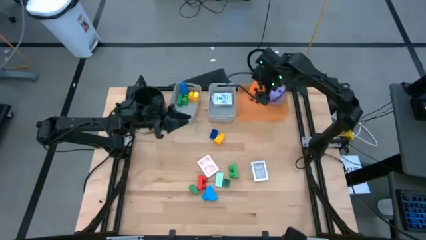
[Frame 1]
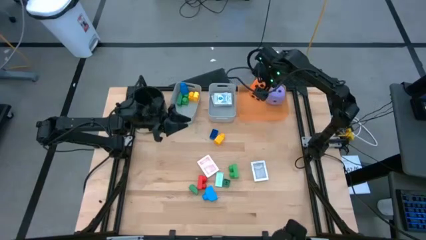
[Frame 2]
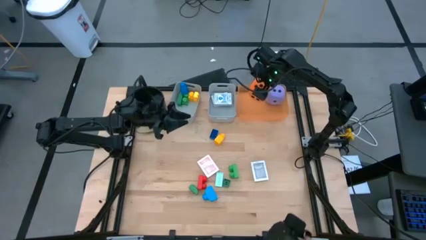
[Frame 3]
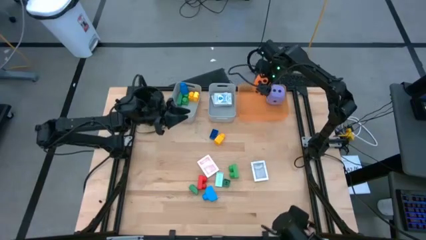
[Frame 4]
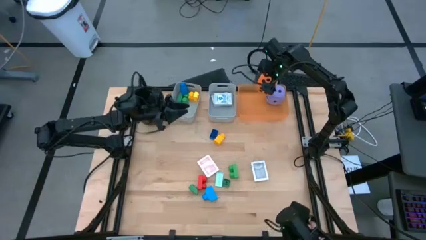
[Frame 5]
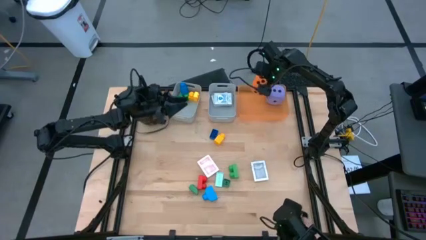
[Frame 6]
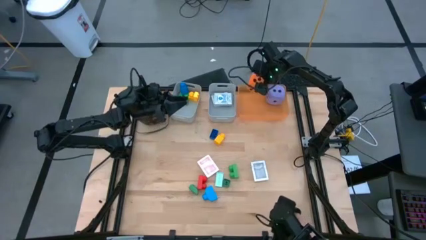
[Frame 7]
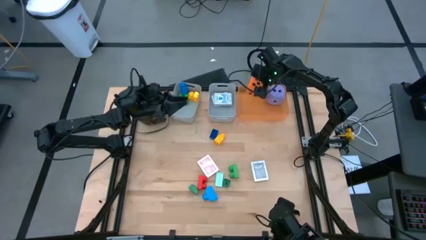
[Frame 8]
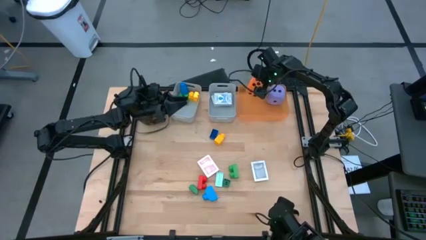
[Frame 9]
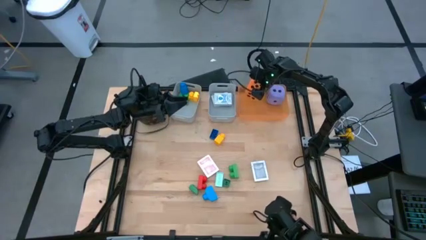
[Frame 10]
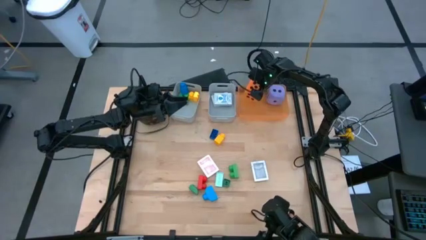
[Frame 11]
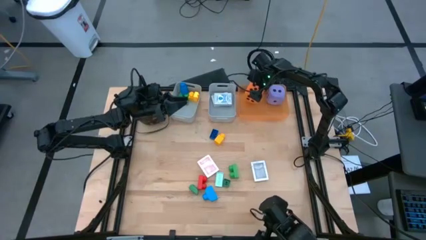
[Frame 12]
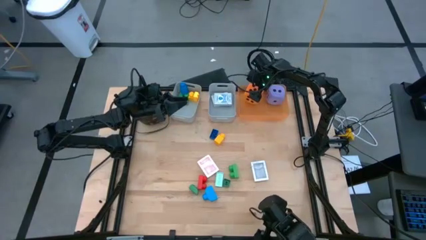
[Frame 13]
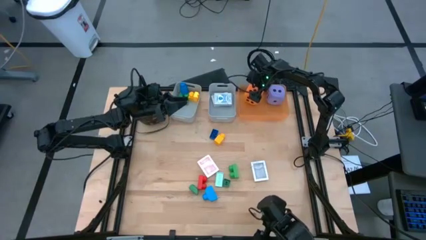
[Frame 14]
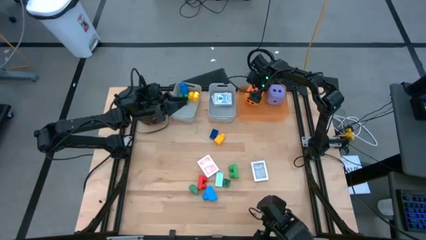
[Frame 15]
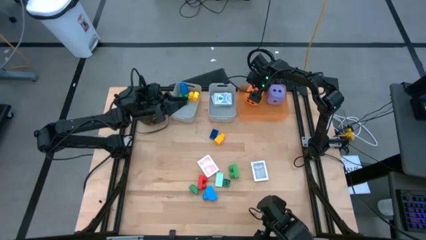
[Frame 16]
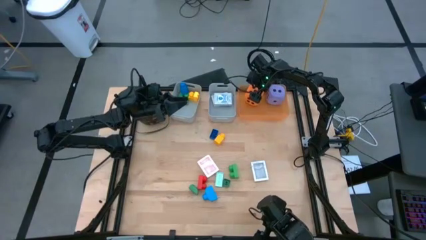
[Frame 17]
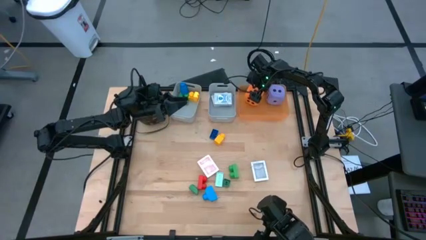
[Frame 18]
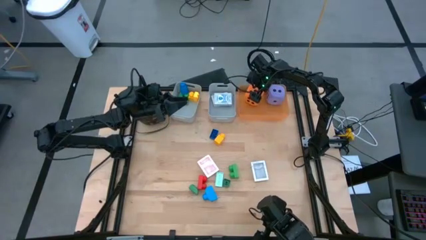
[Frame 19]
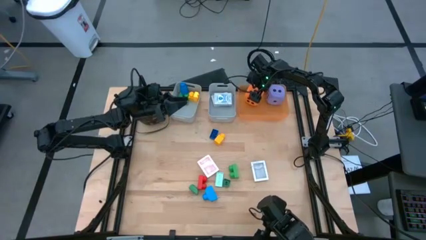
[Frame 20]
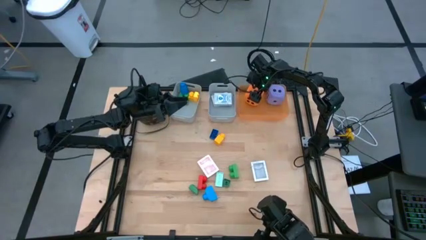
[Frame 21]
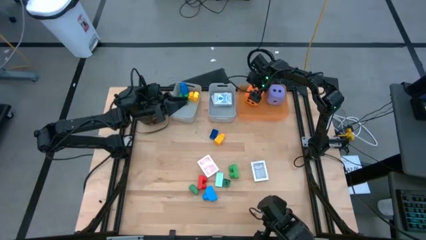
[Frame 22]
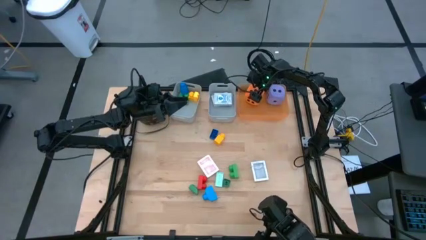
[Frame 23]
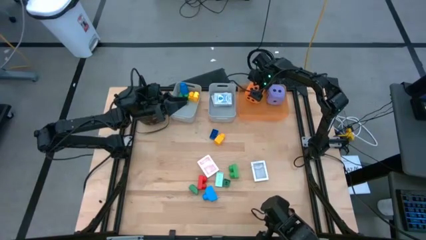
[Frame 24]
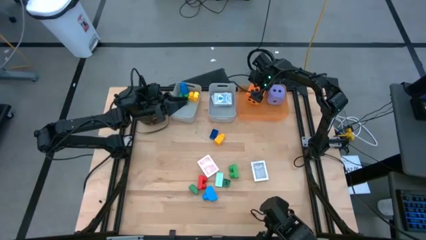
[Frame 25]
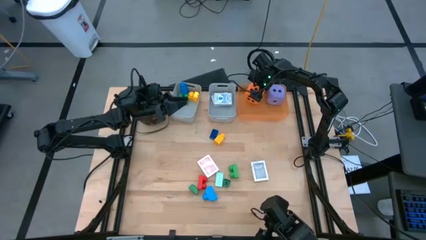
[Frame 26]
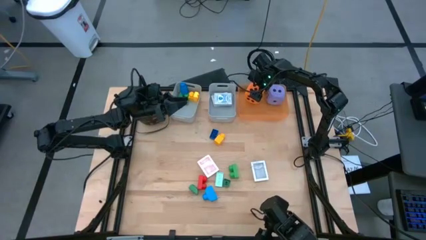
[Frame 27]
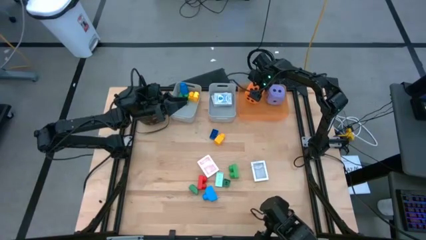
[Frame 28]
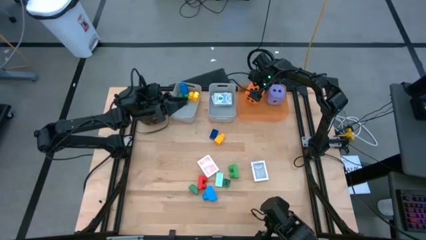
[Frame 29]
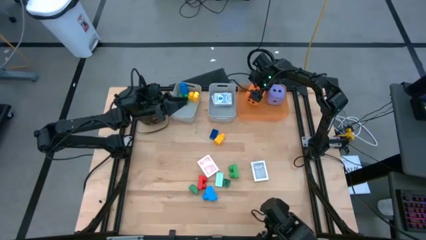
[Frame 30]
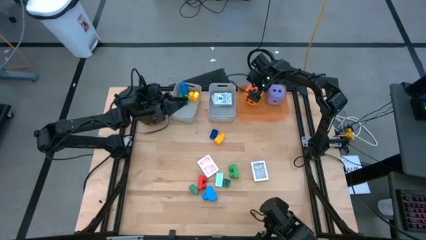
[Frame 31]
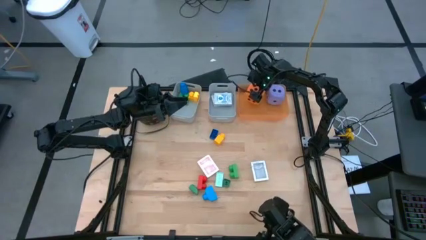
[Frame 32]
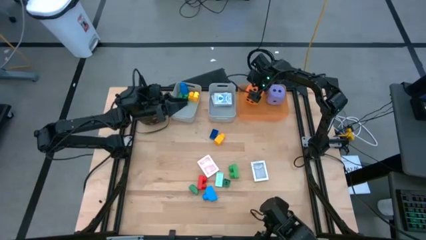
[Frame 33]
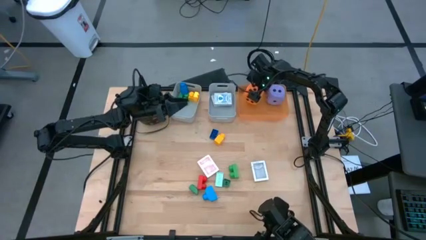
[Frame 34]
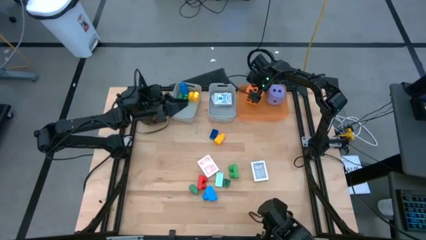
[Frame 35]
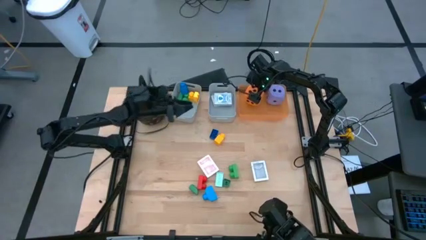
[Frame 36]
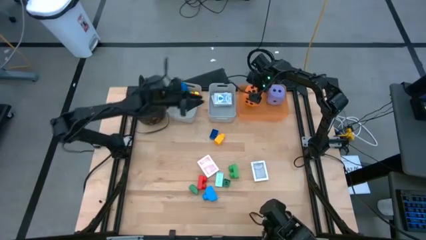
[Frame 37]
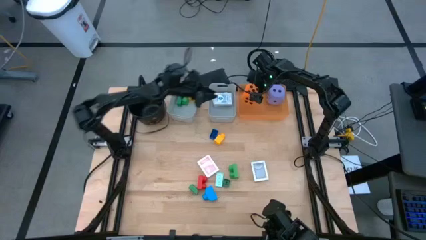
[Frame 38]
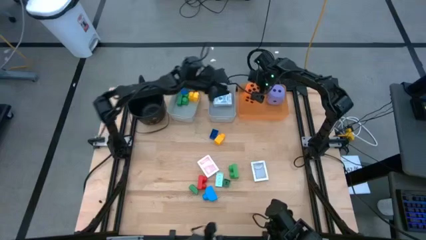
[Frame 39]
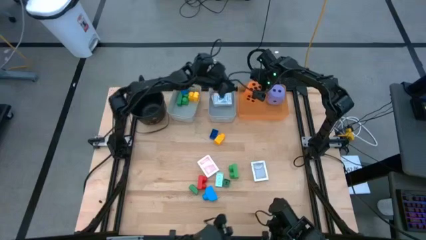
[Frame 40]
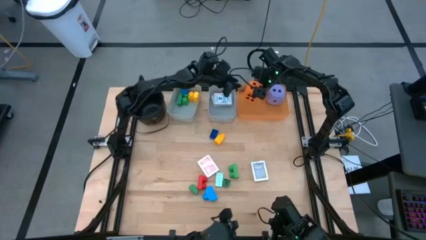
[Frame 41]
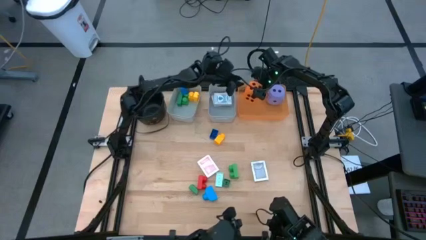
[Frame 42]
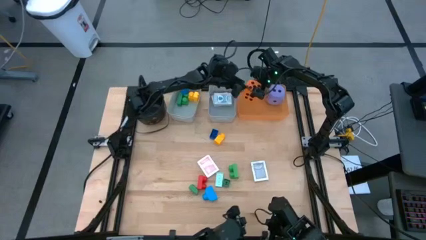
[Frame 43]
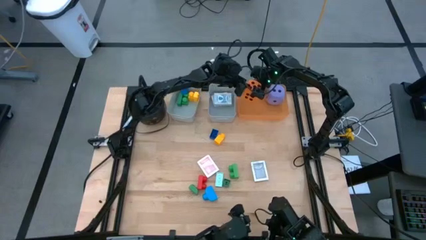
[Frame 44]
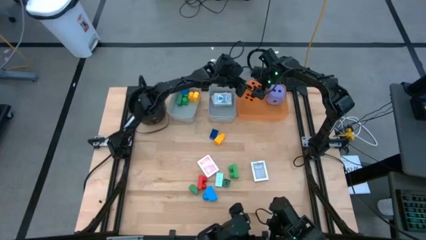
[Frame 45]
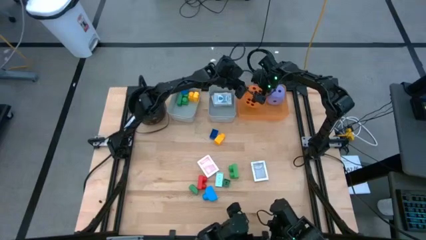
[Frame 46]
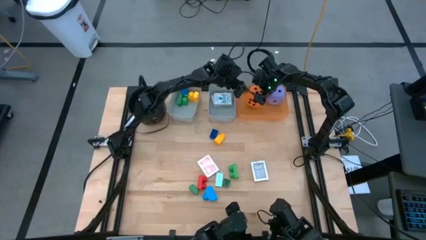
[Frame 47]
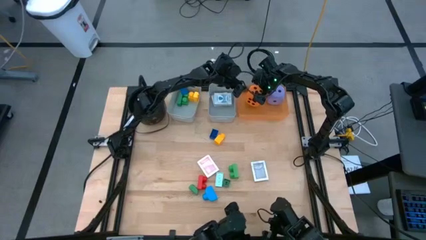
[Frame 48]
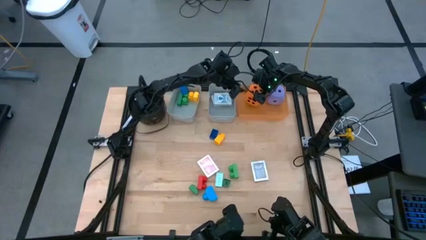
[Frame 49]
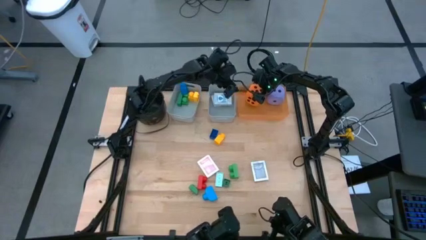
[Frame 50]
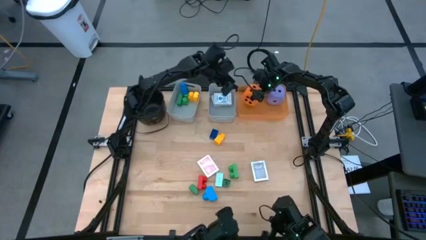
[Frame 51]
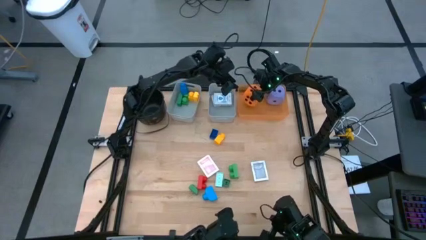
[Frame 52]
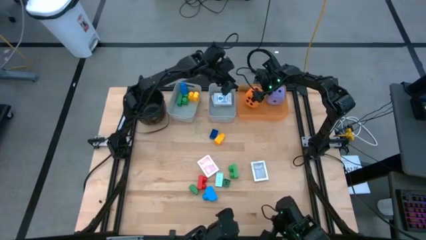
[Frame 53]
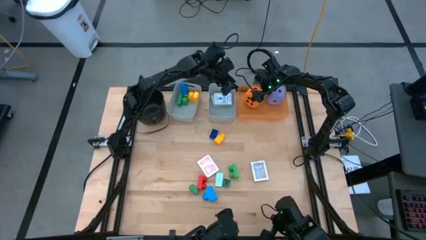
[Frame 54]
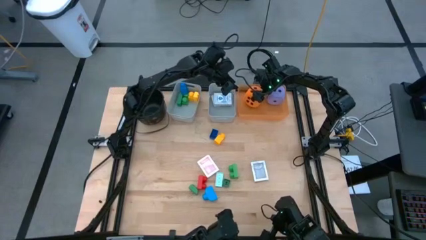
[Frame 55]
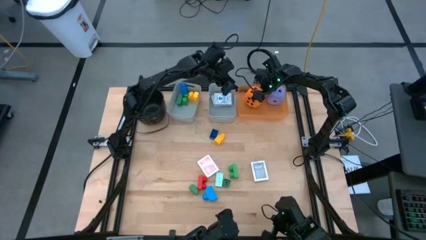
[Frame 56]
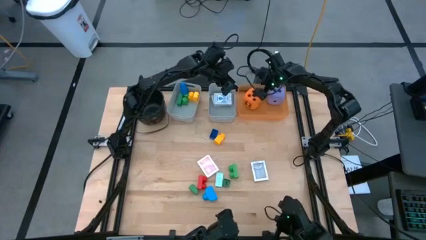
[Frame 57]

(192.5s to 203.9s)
Task: Pick & Place Toys
Put the orange dice into the orange bin
